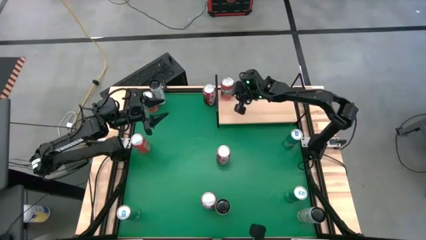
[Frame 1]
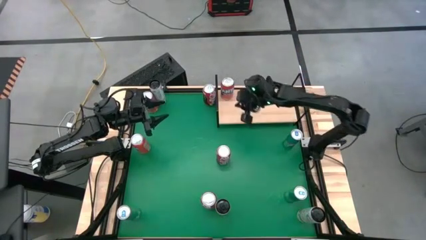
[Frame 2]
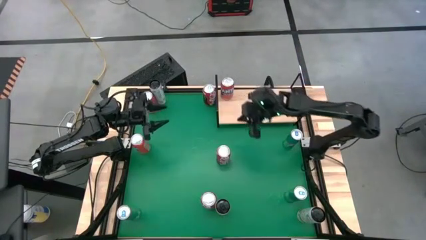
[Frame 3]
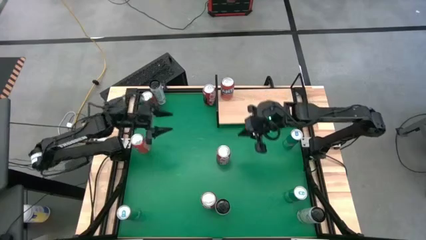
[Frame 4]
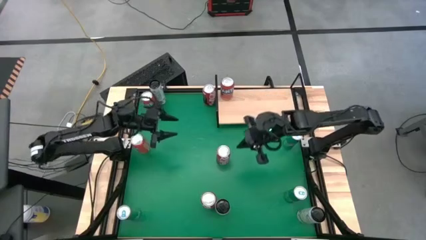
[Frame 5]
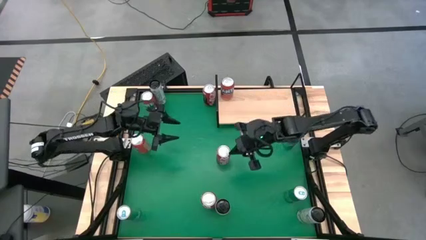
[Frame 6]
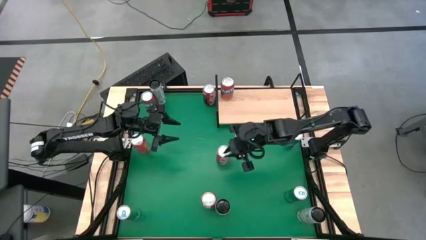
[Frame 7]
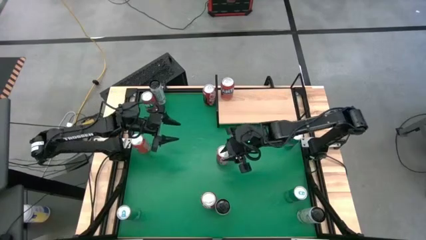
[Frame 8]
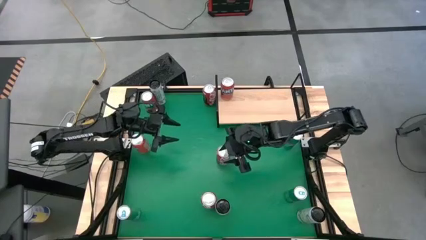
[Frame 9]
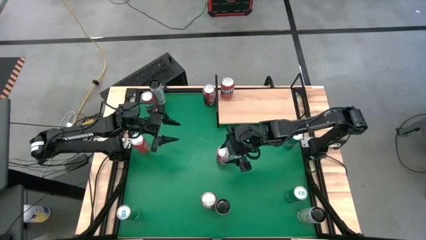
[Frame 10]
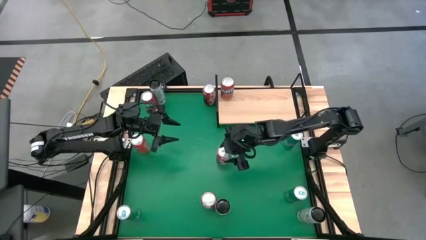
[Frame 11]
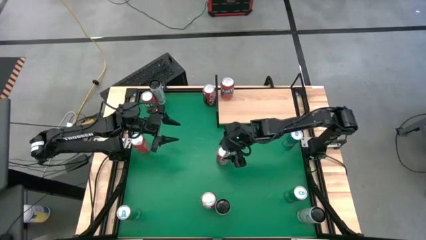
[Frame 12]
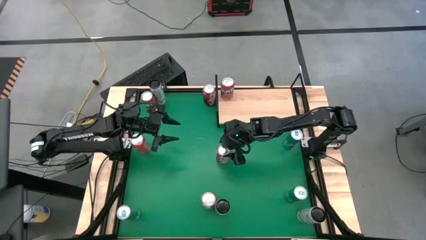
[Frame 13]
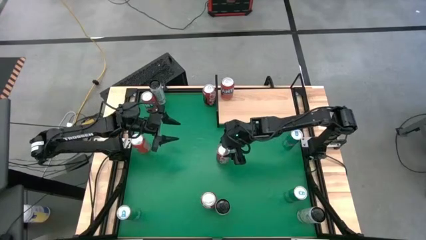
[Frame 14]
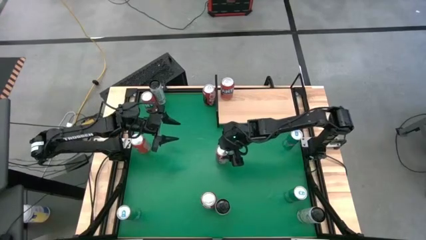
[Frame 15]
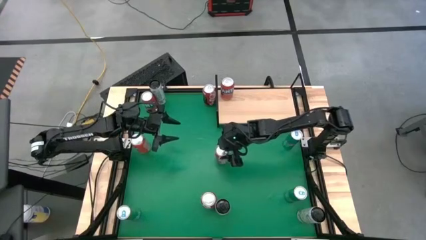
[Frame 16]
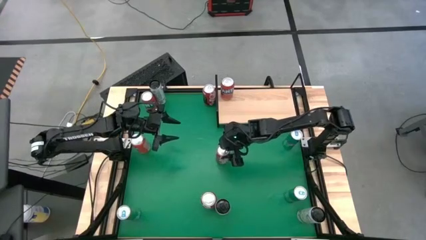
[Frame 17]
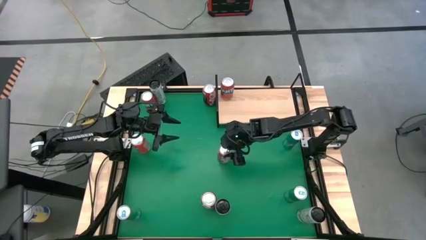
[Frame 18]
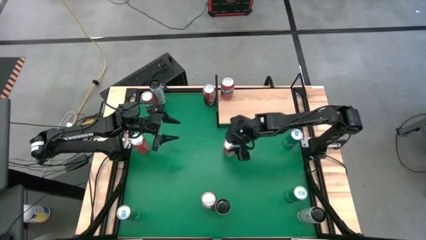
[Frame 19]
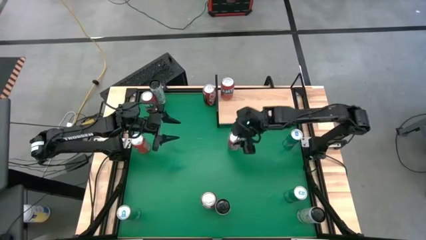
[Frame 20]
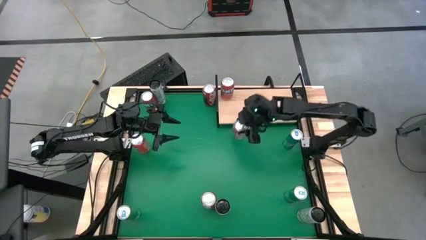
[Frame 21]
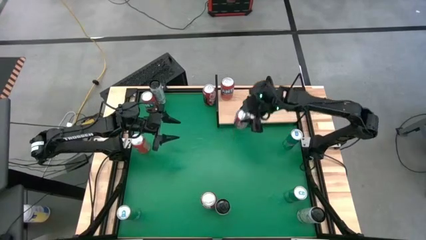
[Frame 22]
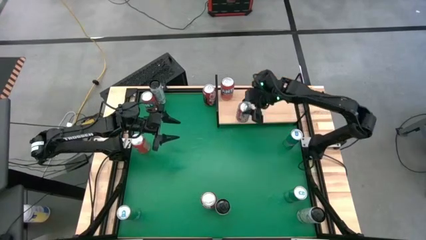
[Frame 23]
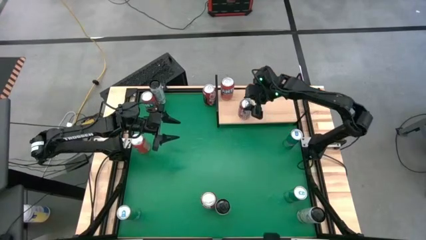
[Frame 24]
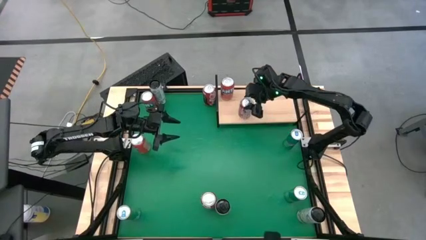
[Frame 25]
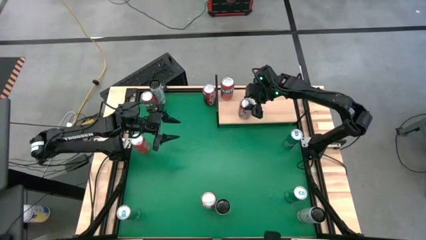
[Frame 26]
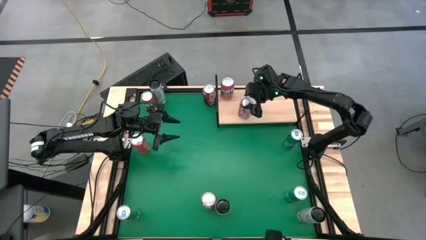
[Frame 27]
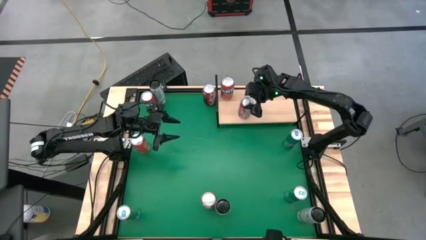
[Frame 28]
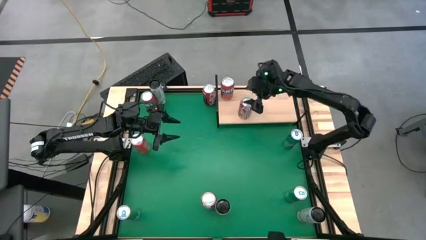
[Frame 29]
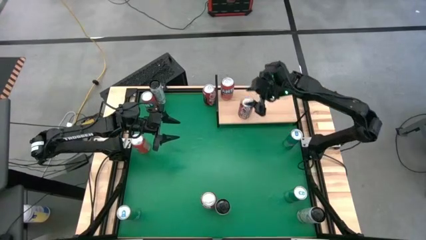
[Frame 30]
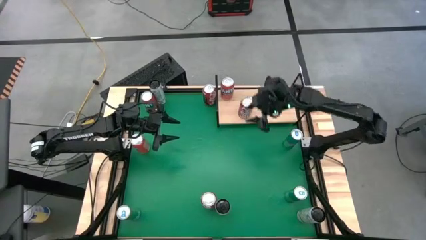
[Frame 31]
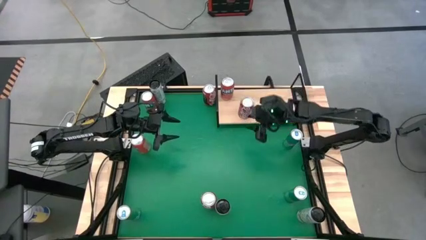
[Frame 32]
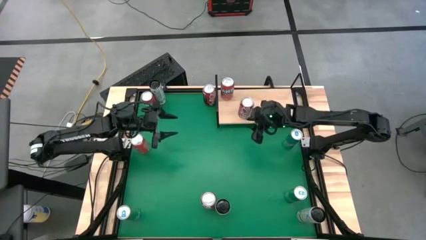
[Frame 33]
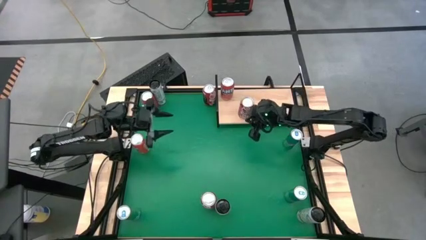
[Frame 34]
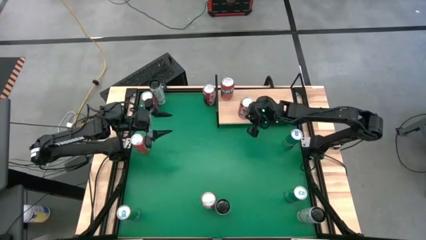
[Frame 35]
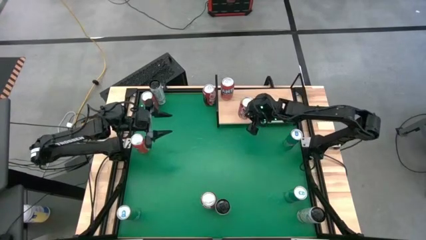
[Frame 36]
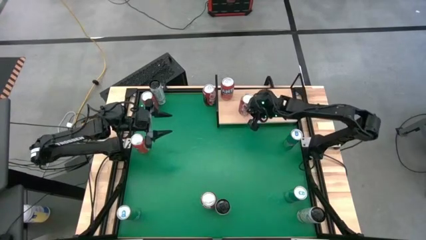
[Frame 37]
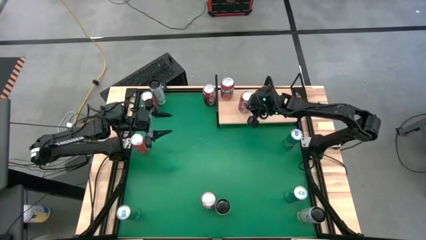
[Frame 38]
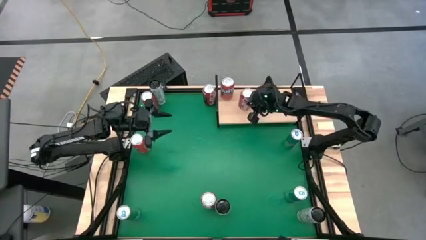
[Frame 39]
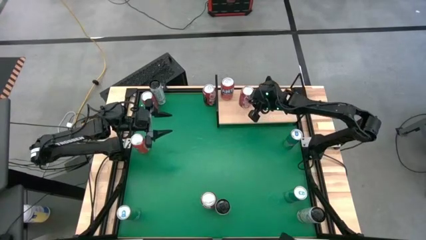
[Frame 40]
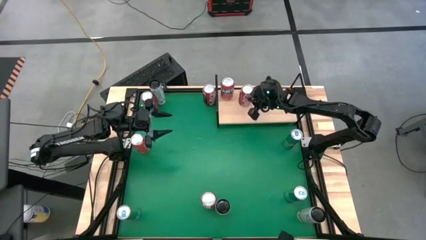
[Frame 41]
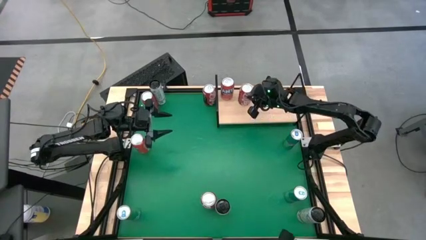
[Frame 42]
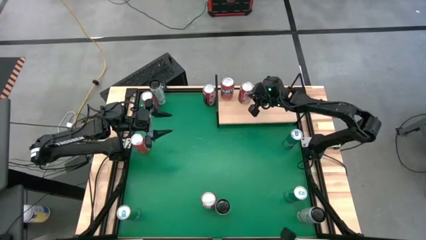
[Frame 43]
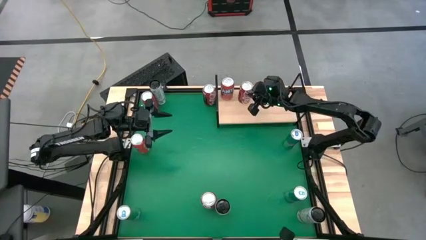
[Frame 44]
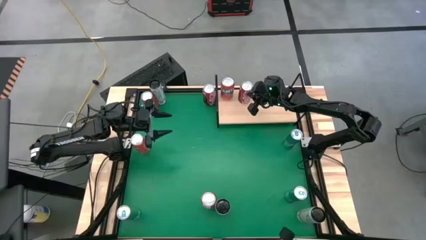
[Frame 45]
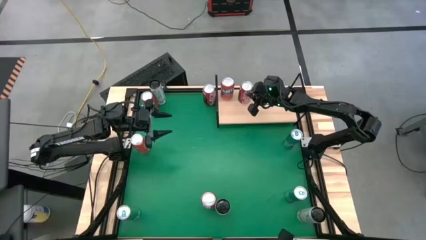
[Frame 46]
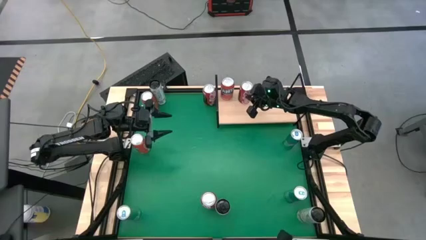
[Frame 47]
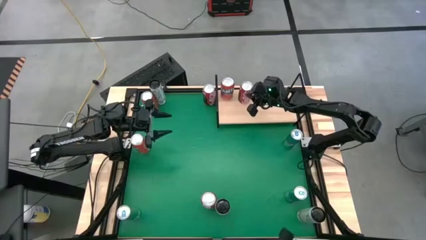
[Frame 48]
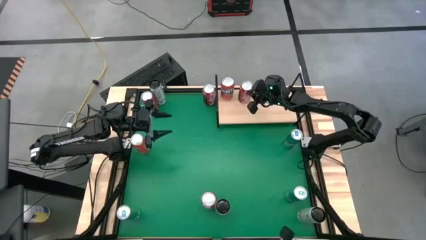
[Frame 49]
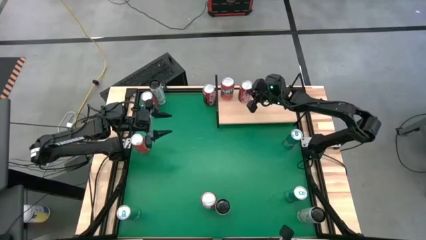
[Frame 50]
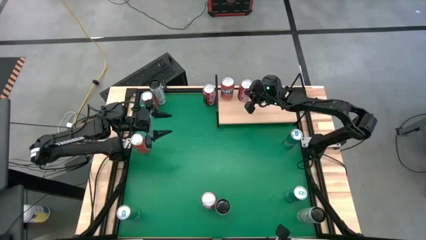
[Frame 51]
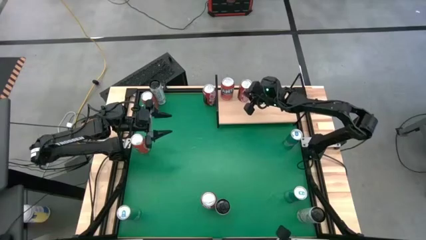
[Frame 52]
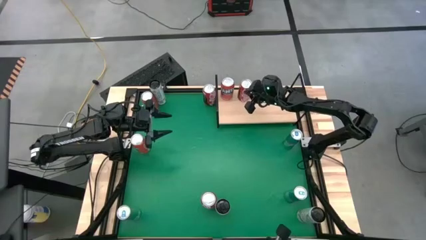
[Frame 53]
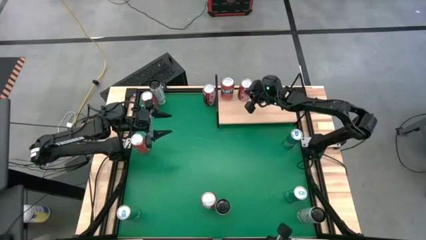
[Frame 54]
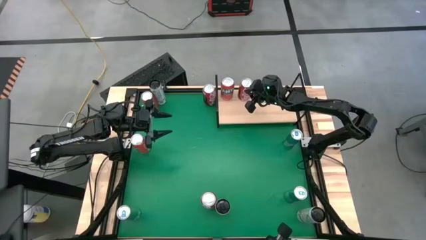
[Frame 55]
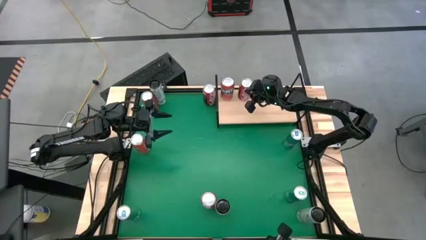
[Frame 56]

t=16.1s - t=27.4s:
Task: Place canned beverage on shelf
Put the center red white soda can on the shelf
